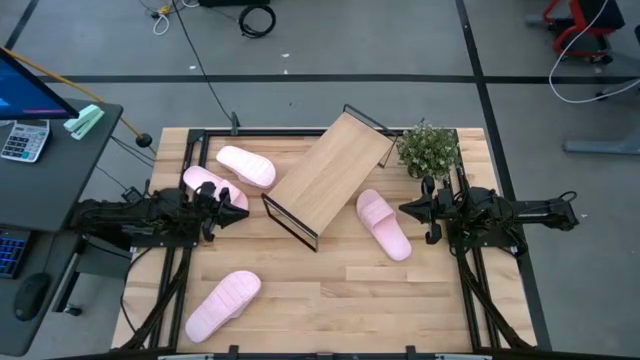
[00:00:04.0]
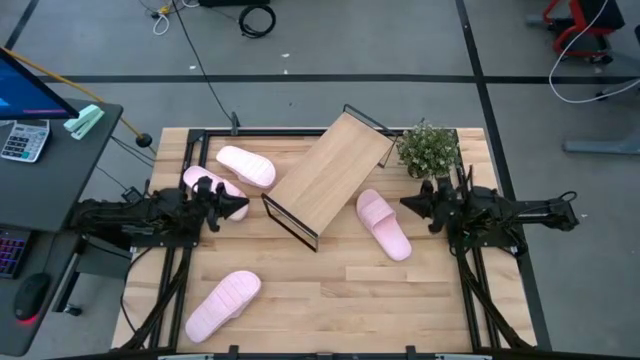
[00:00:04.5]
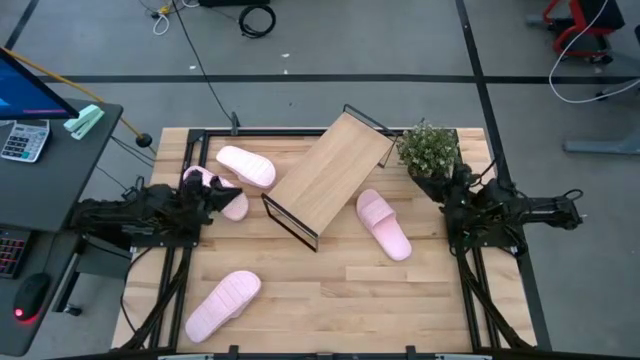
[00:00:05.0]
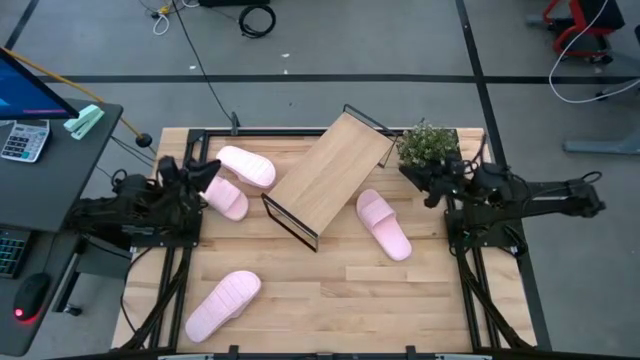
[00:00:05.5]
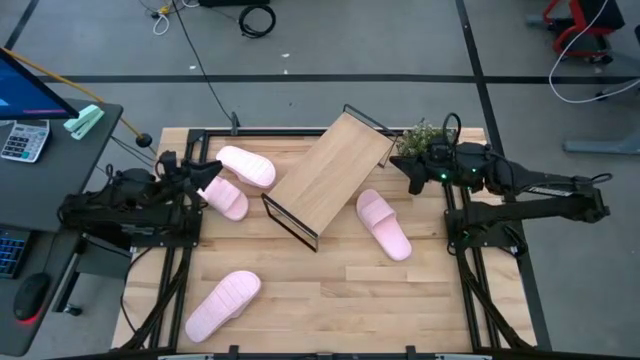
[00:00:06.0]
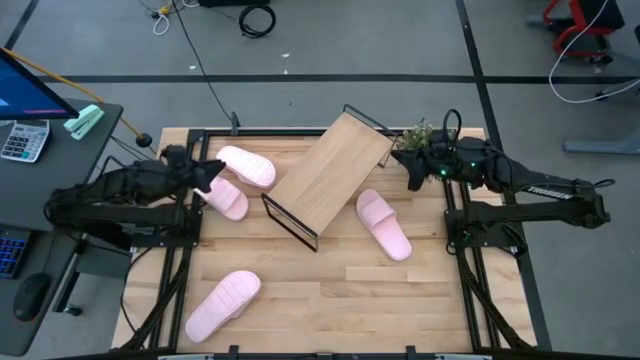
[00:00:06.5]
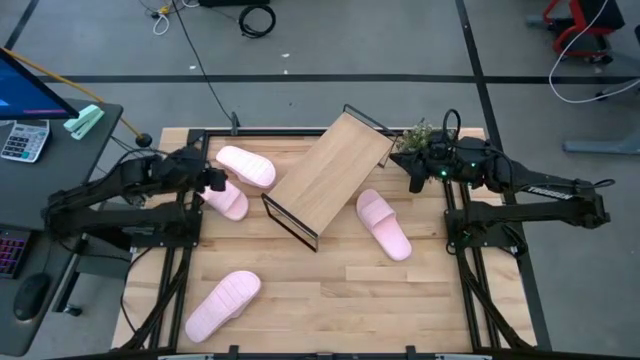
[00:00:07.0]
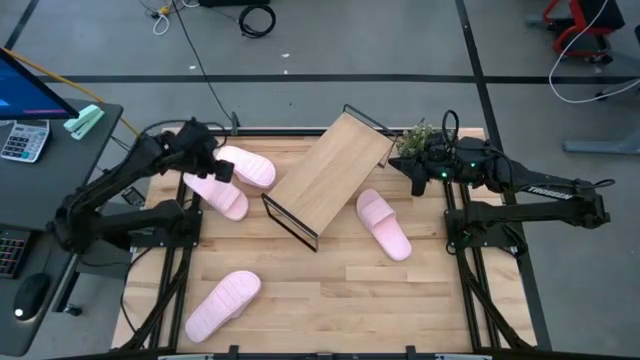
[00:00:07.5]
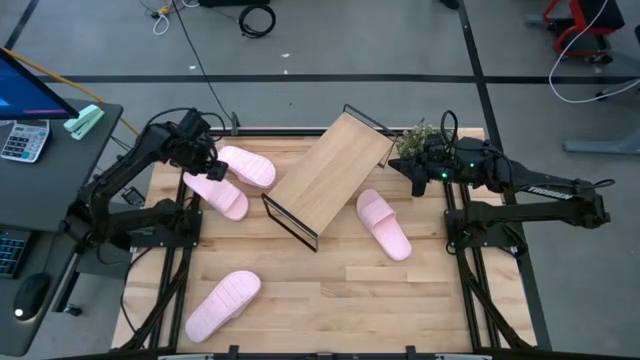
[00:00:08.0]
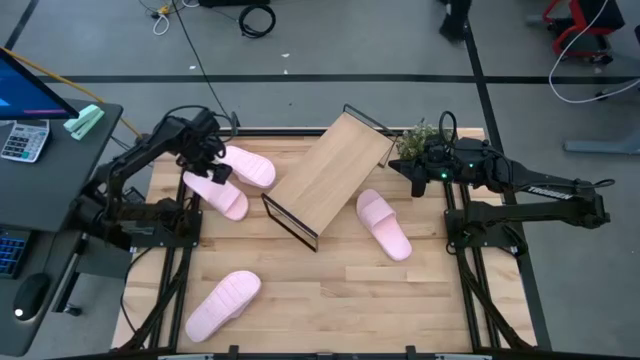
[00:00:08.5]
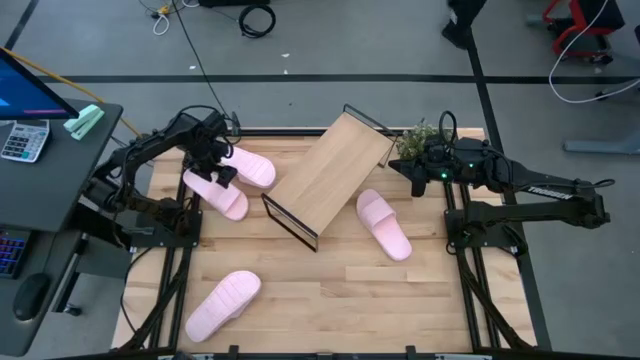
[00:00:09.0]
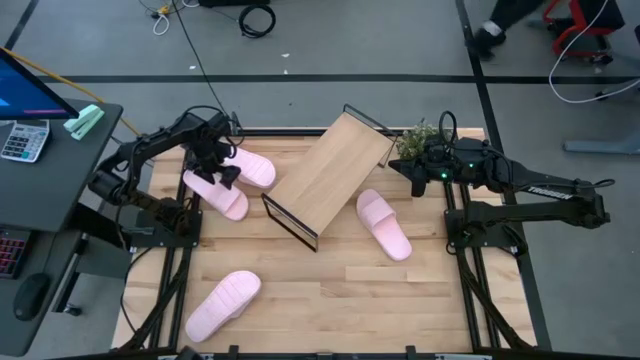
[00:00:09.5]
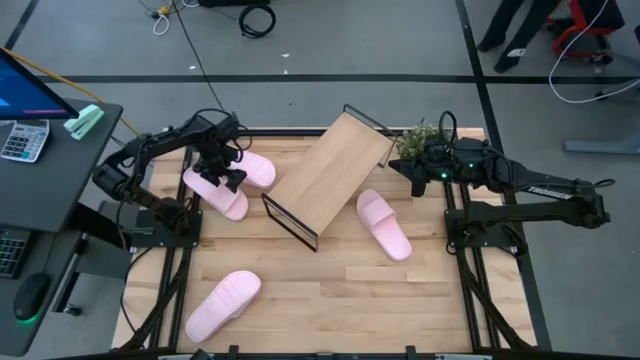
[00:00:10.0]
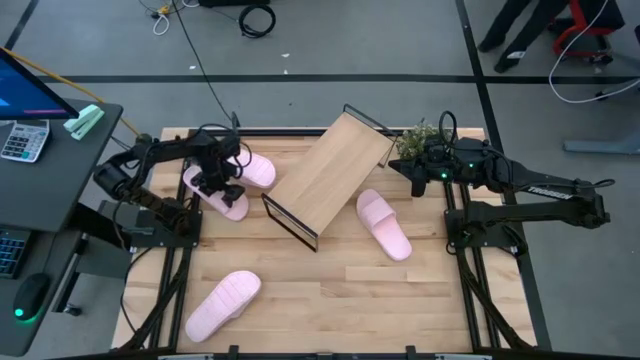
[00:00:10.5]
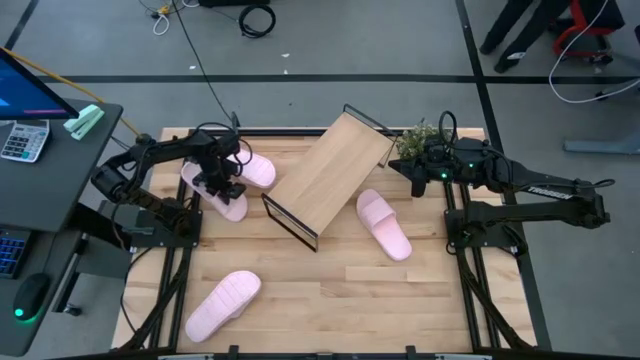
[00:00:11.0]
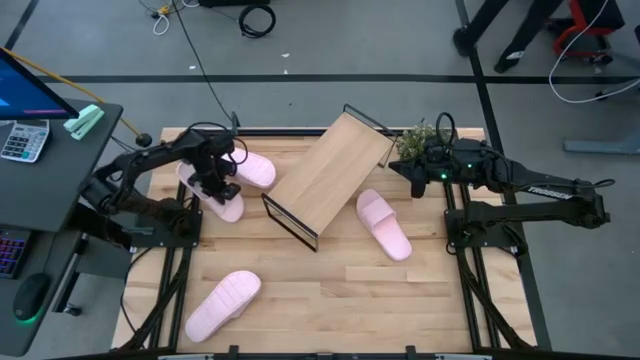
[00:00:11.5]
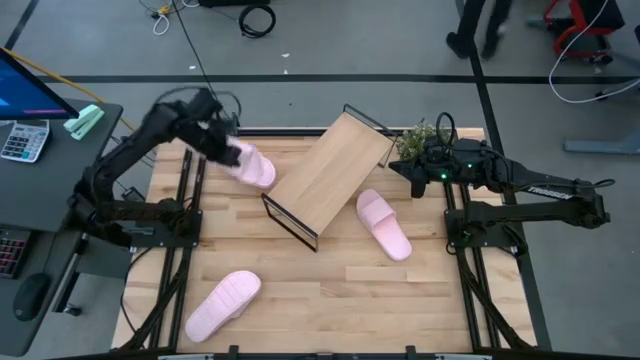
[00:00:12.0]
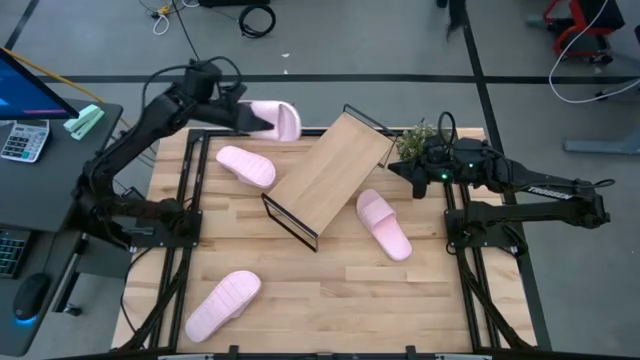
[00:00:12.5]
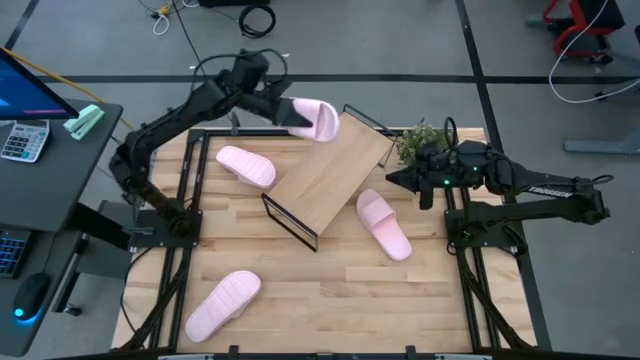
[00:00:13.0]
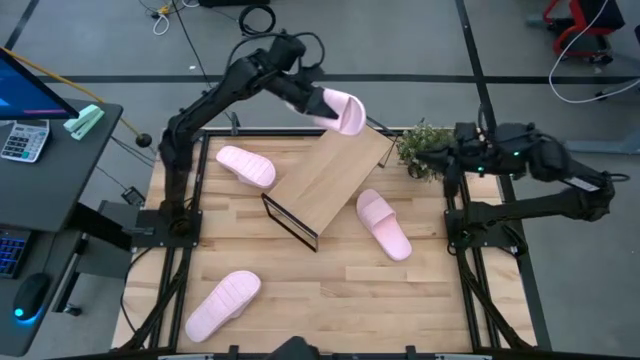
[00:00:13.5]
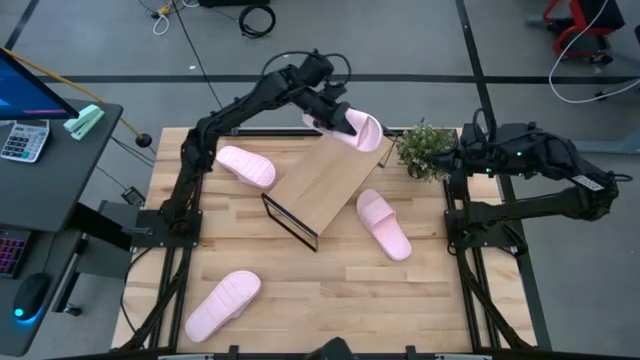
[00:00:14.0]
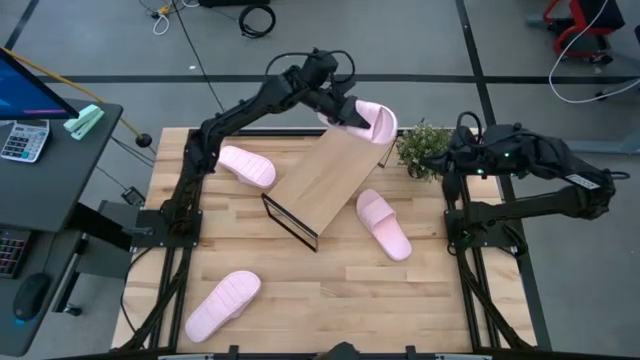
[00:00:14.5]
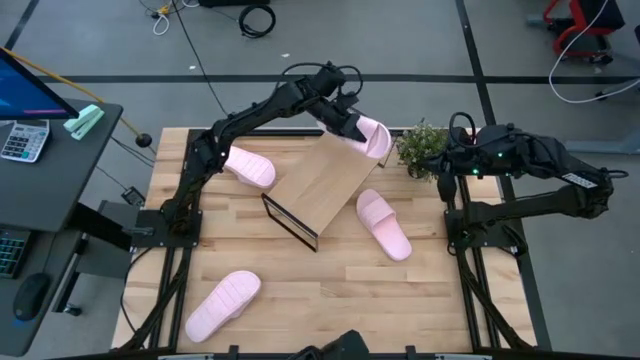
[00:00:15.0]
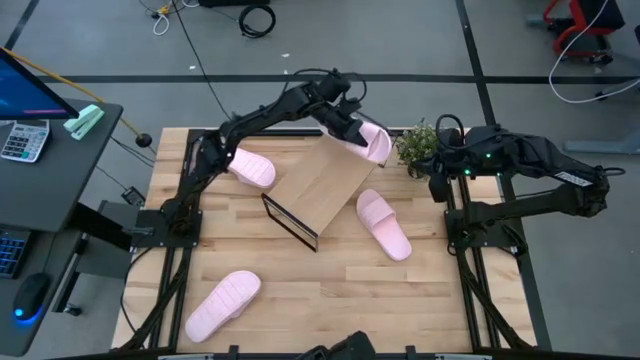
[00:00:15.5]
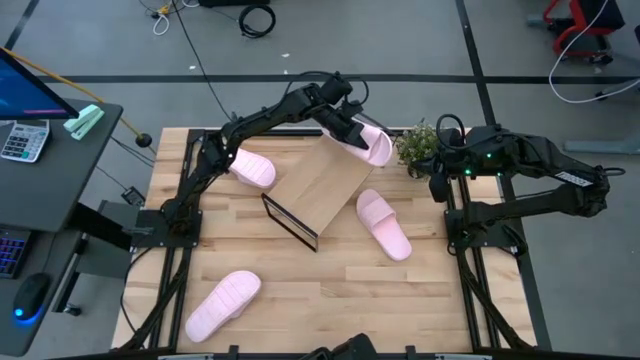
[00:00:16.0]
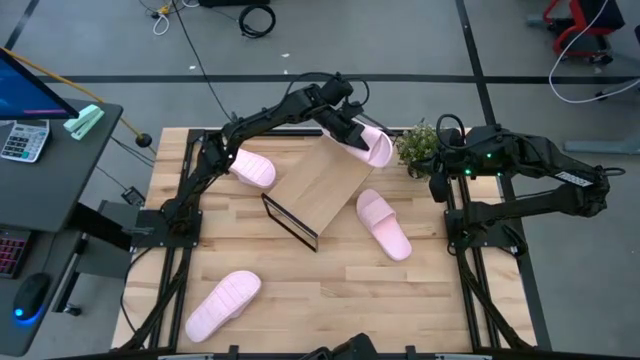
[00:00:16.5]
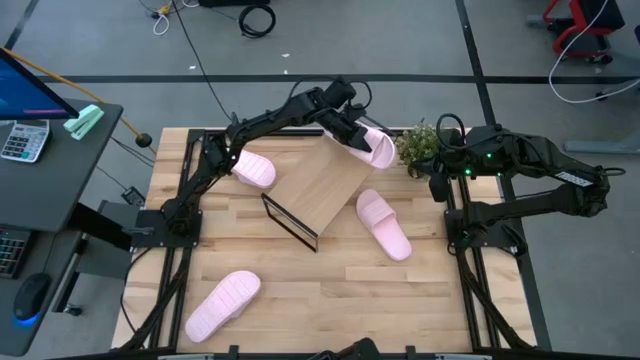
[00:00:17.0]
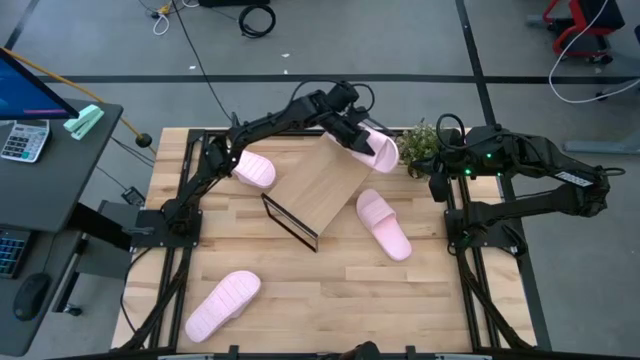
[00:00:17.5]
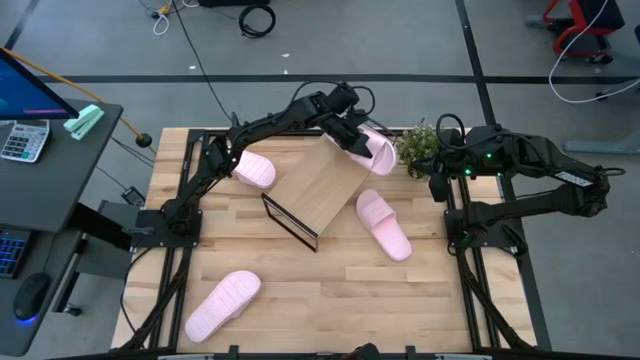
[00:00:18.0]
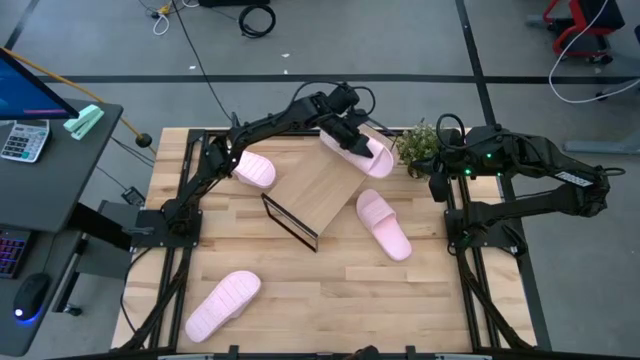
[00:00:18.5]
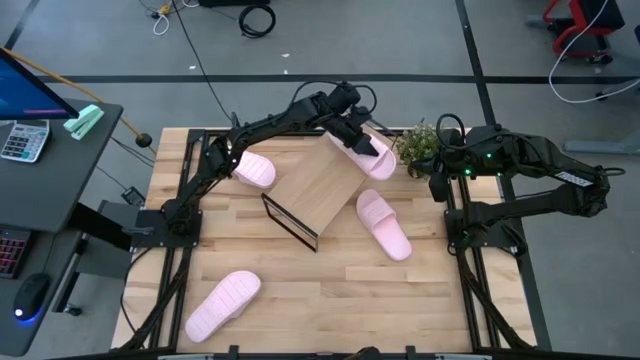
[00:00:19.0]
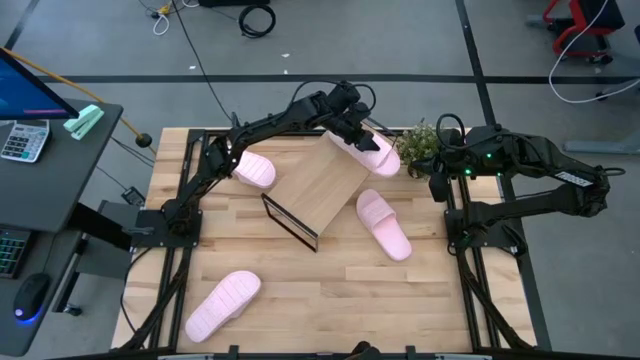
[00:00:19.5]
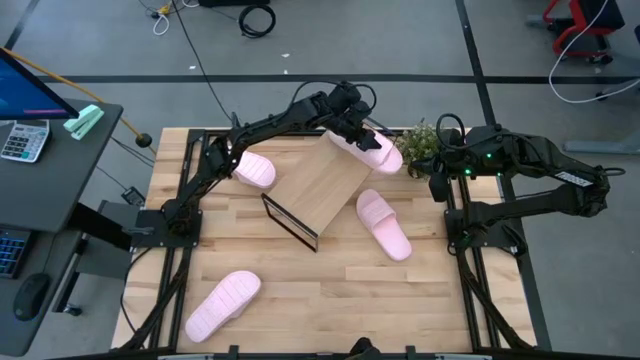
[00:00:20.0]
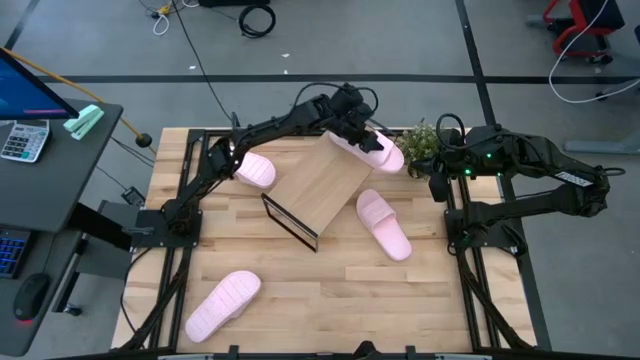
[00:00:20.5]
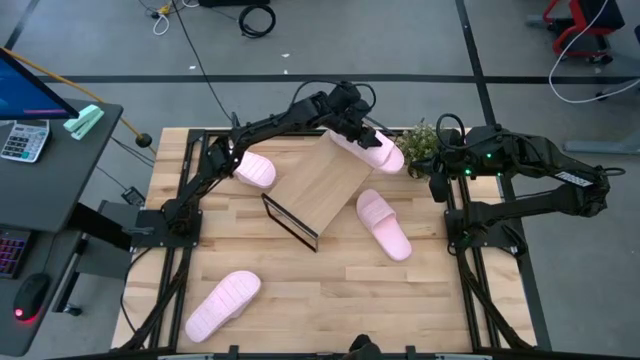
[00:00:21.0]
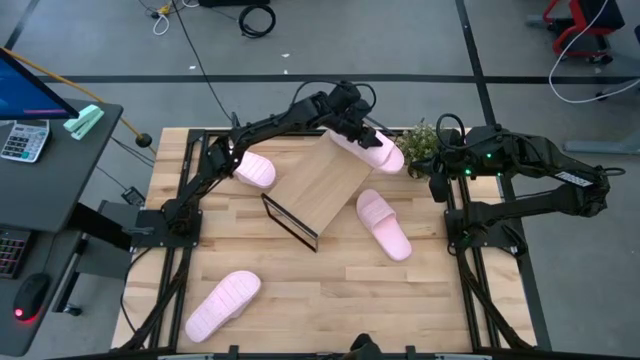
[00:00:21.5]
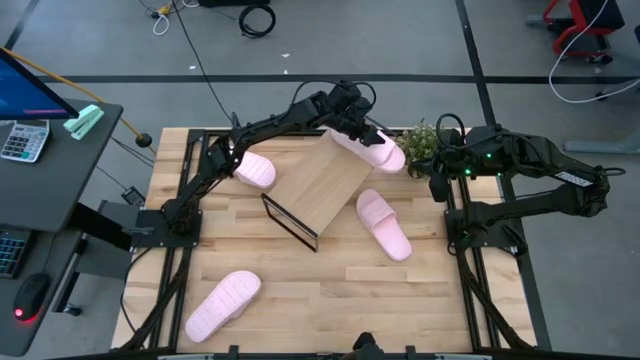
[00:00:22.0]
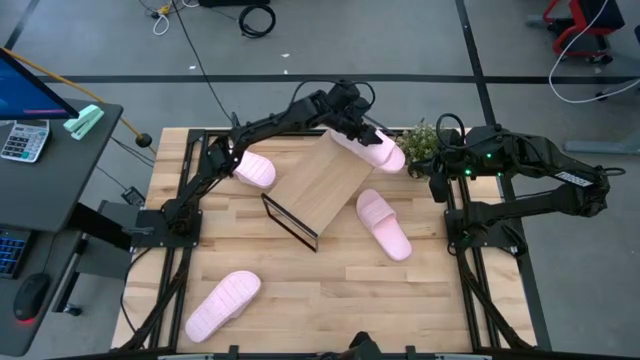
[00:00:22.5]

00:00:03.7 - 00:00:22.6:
Task: Pick and place slides into the shelf
Put the middle left pink slide on the shelf
